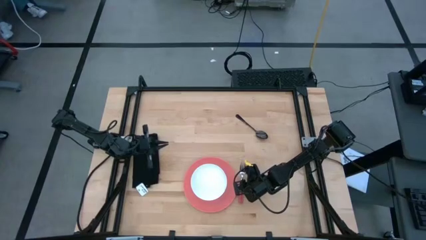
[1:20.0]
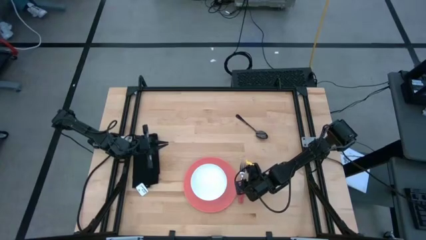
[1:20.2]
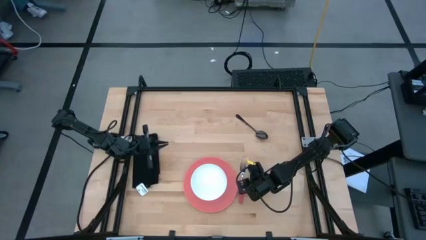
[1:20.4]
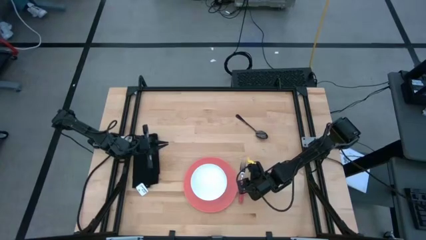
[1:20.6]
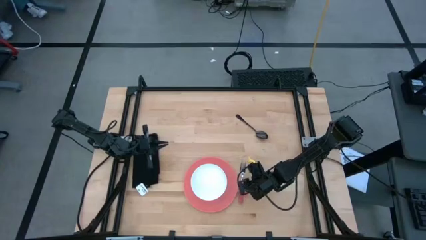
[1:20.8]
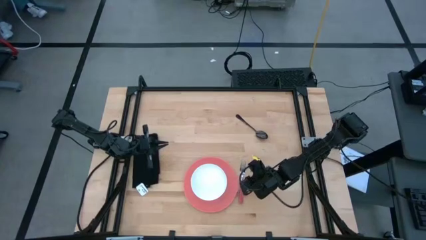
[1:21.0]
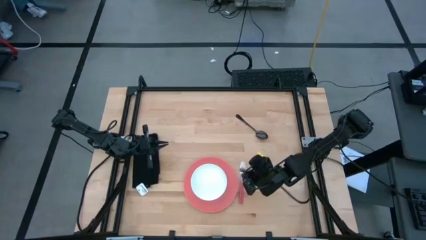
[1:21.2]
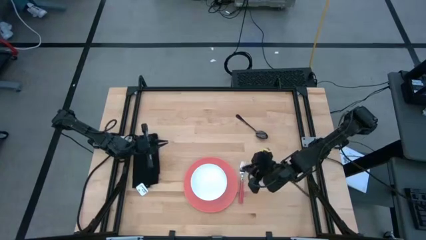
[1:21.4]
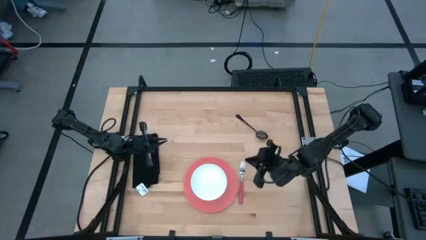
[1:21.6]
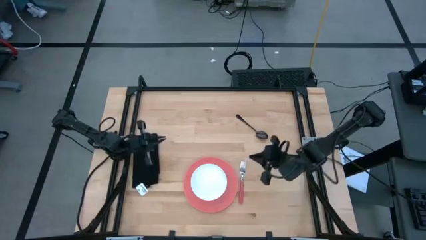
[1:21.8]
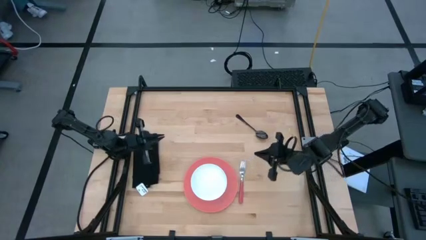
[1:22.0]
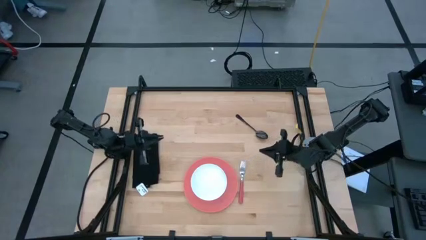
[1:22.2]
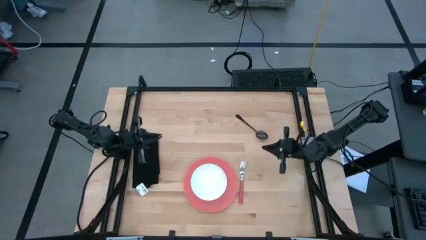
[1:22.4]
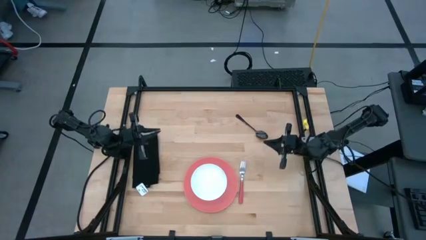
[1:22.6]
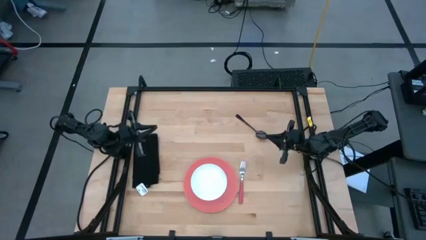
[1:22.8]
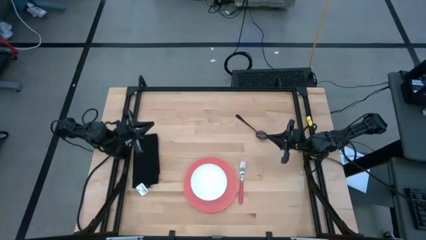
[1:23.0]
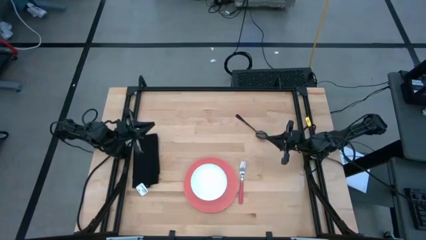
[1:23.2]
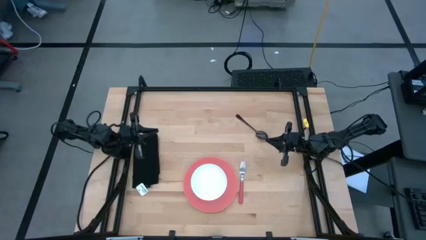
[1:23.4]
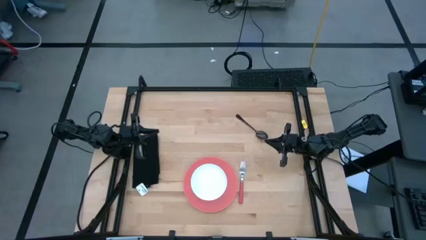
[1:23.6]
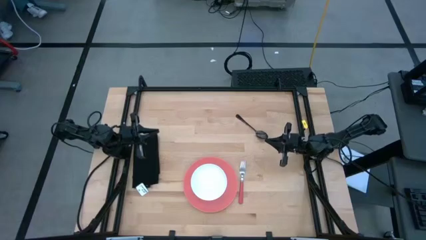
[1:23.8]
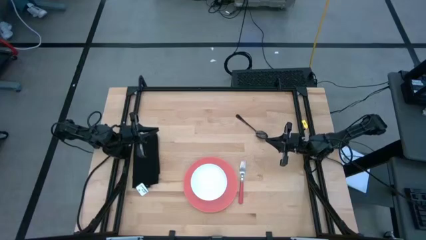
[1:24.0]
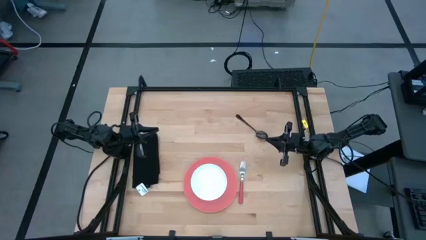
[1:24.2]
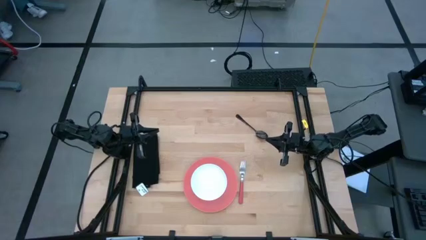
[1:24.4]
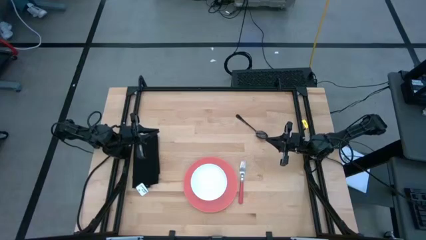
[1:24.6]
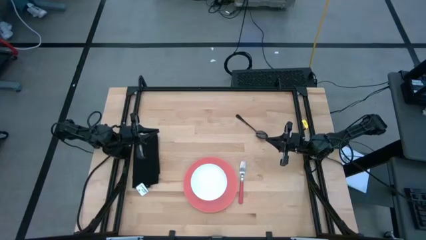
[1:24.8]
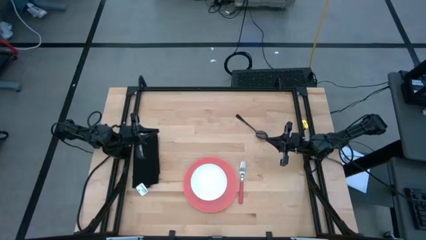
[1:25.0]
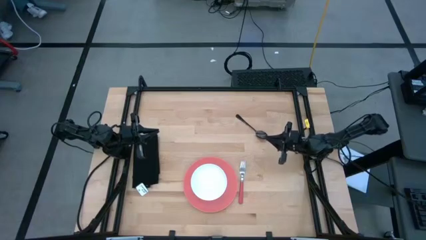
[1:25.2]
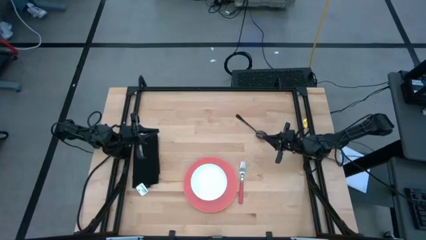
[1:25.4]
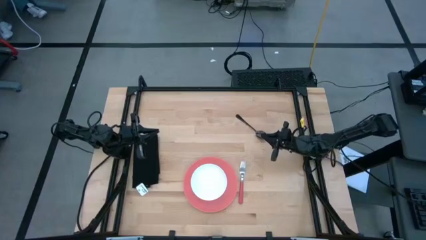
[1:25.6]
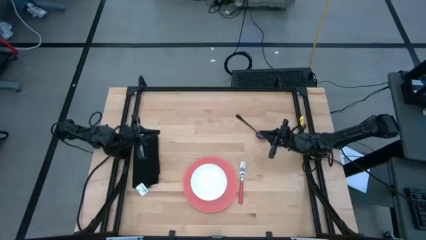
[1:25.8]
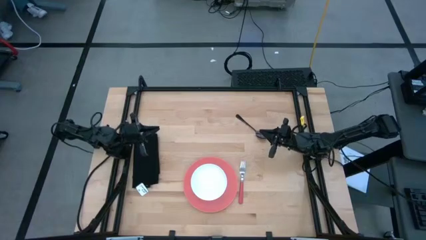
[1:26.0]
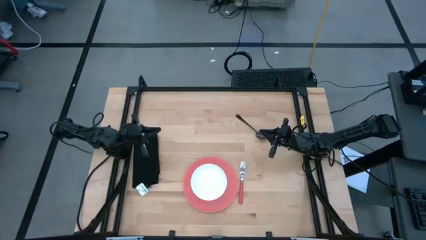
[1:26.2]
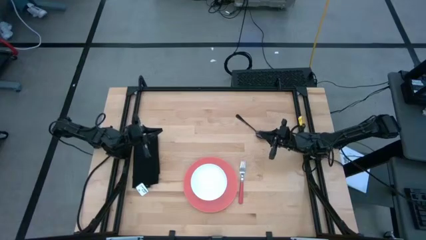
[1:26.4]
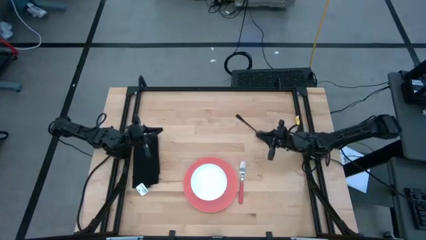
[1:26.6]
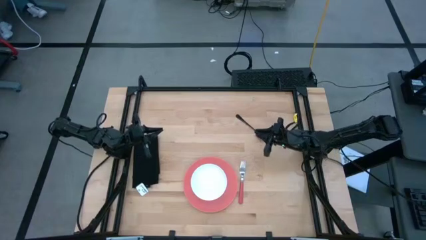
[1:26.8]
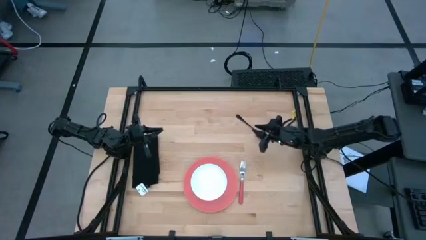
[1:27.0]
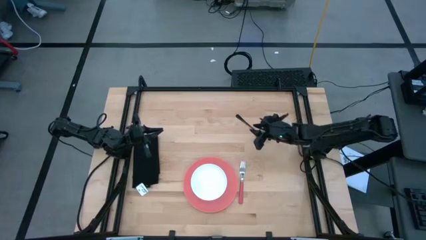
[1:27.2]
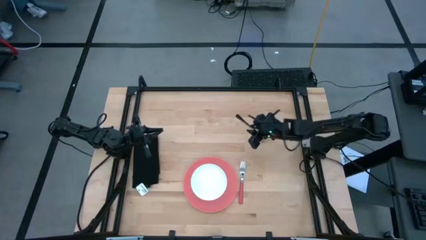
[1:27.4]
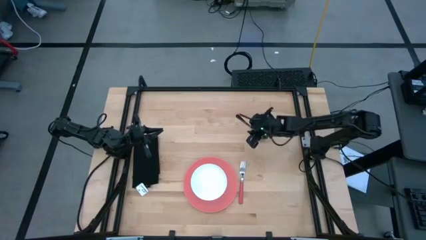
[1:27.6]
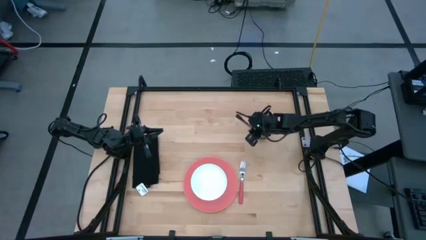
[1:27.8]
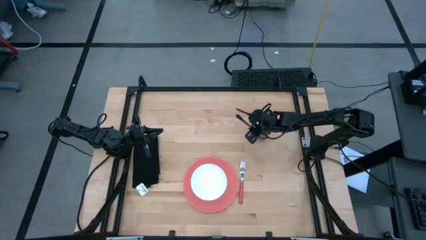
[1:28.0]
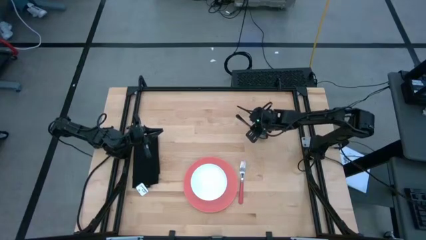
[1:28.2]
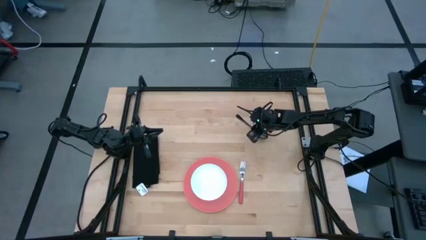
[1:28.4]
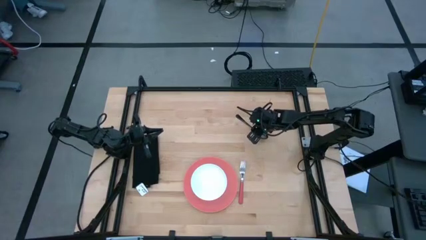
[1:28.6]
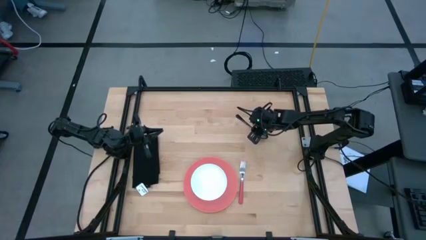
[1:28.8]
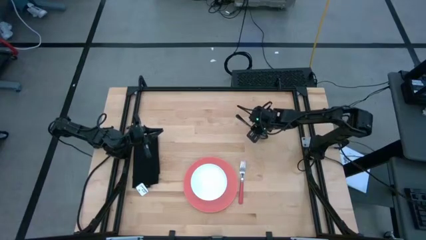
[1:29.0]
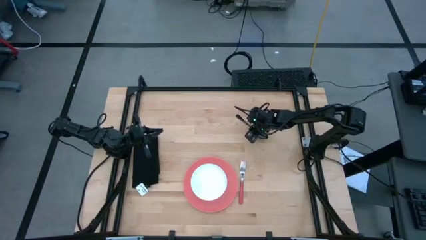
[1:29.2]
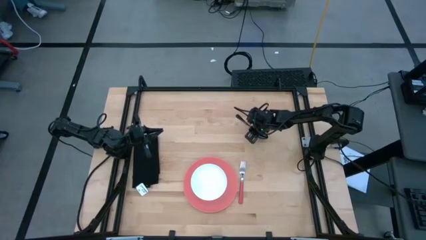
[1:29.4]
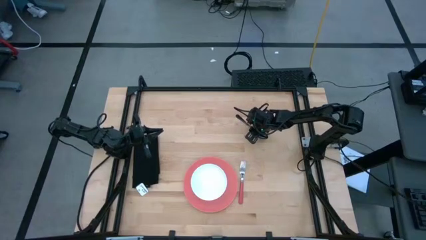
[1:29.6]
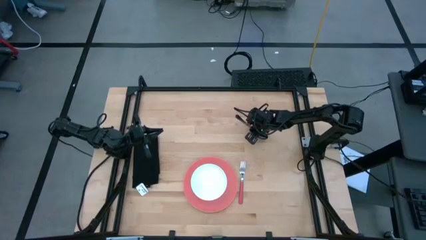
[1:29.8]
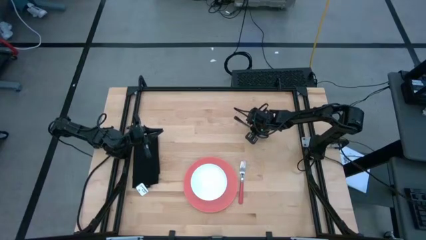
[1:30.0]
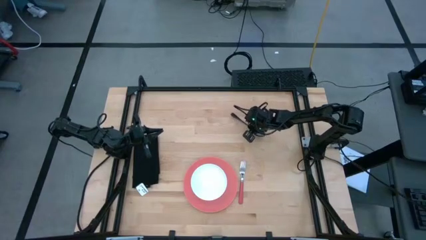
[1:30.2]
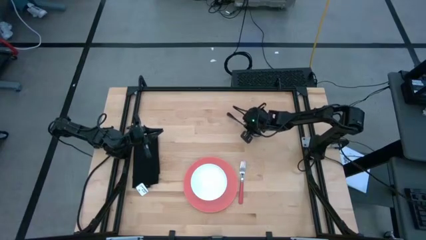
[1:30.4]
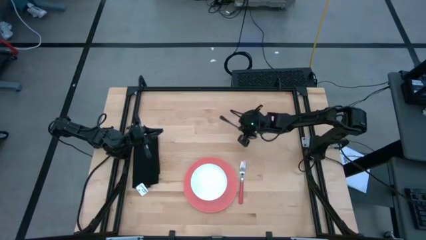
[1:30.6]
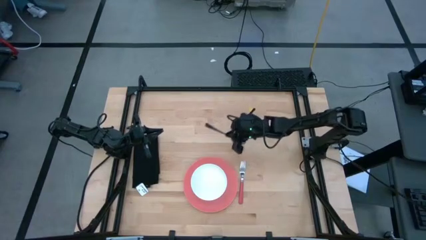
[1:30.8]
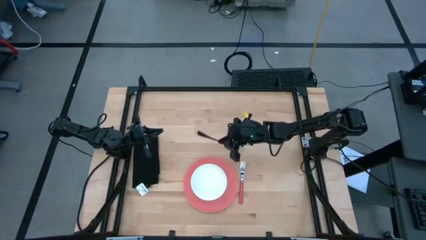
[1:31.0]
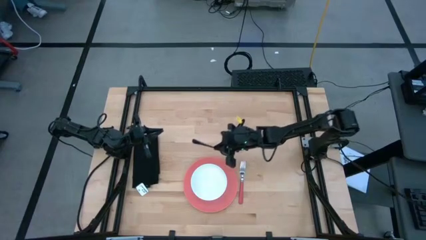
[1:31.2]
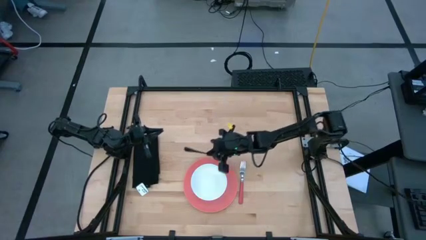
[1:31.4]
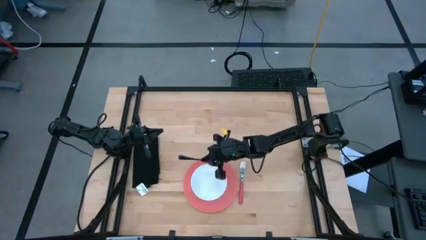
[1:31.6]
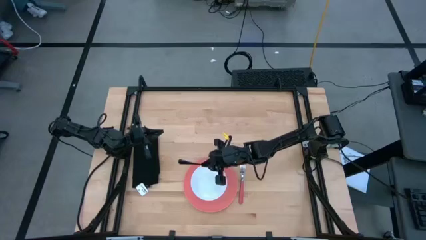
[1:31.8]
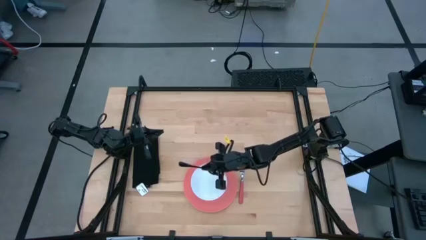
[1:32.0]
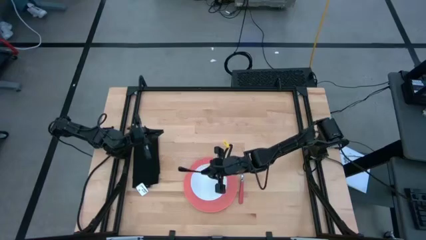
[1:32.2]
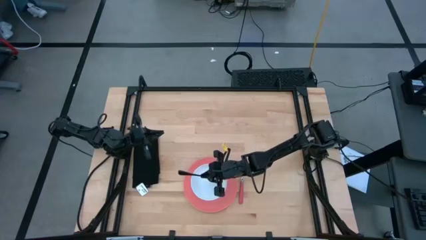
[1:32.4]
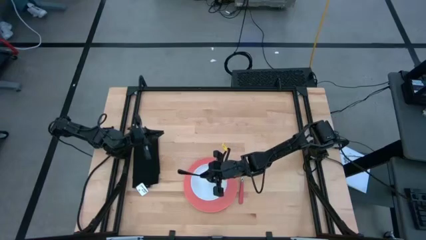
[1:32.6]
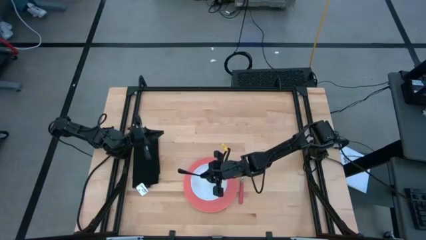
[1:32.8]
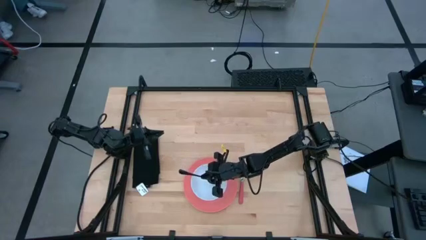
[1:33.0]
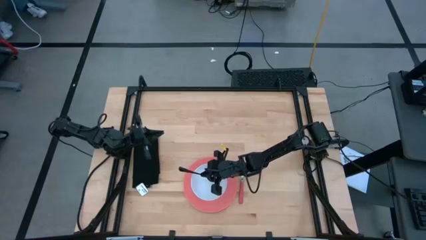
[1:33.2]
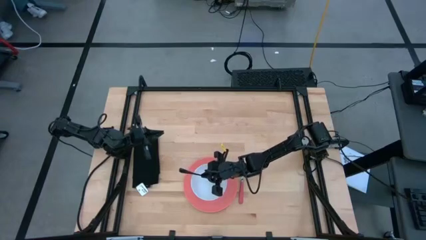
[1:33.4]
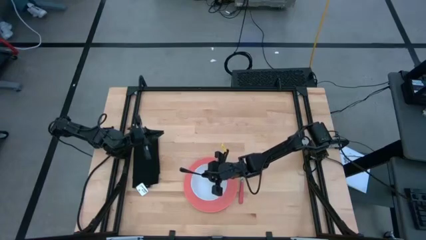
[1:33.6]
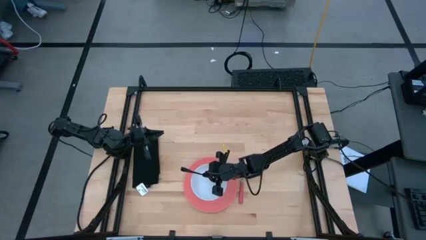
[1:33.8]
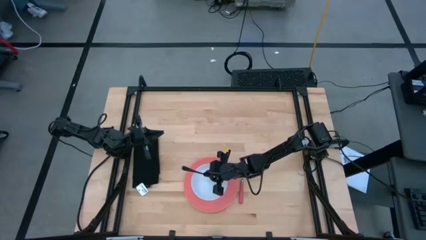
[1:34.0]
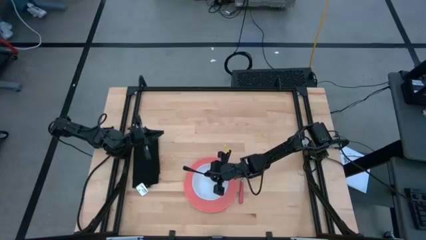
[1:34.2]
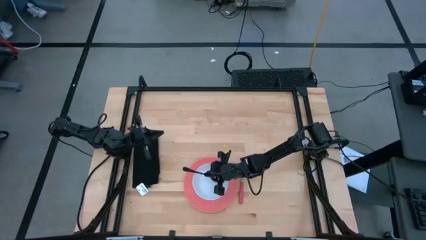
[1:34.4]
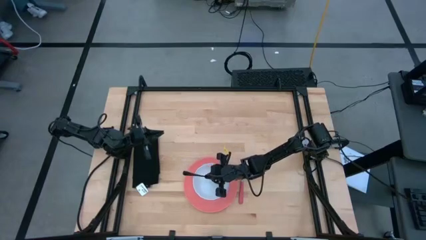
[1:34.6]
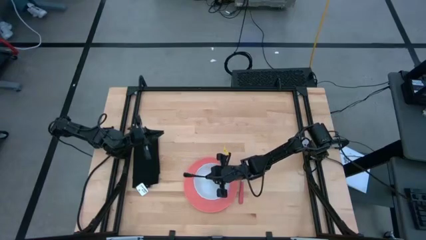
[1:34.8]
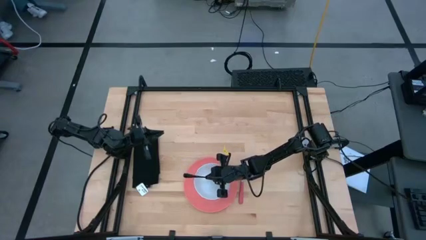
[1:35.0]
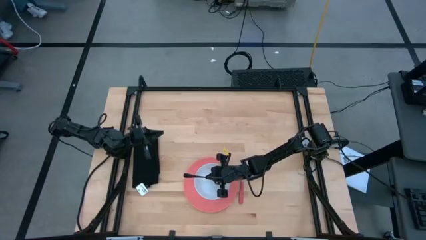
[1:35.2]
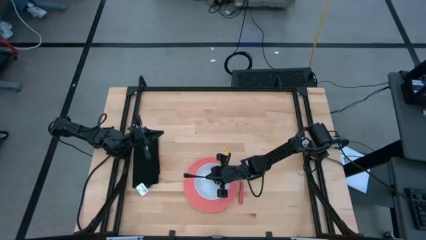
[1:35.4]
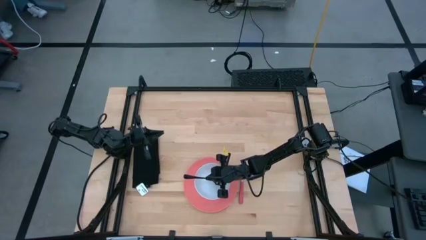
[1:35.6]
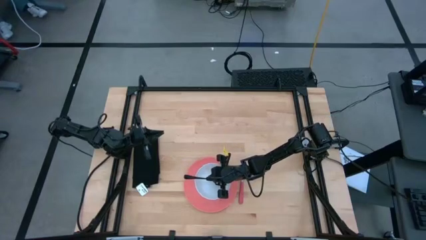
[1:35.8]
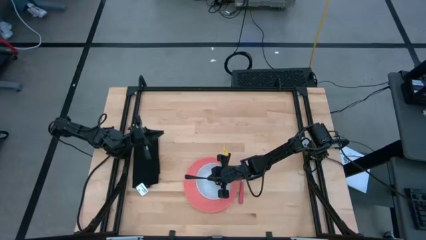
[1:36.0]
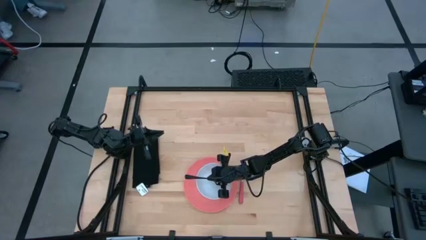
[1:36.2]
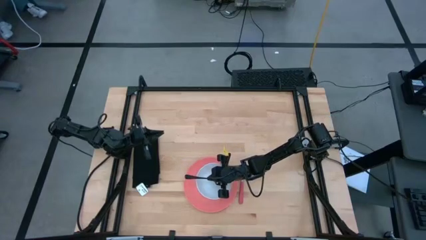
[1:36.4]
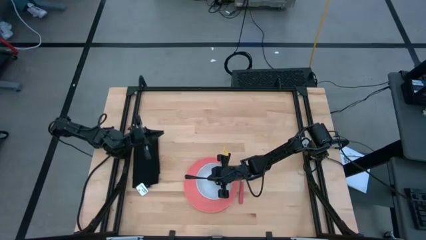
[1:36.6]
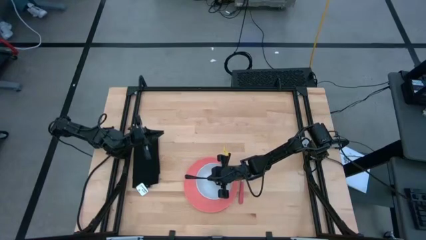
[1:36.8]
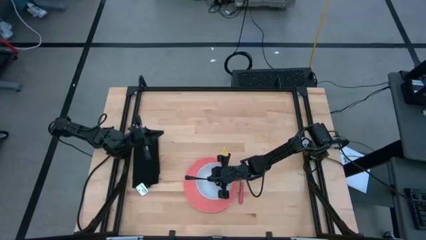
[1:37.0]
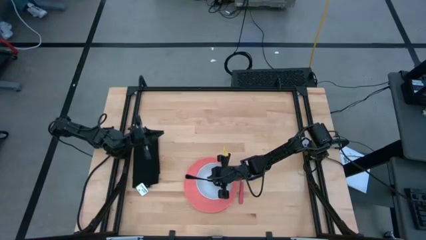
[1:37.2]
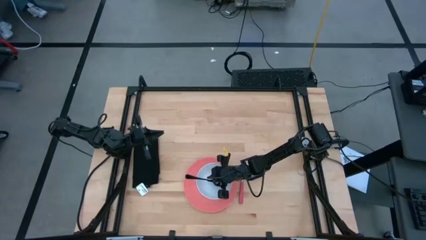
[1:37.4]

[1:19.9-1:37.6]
Task: Set table place
Put the black spoon into the white bowl
